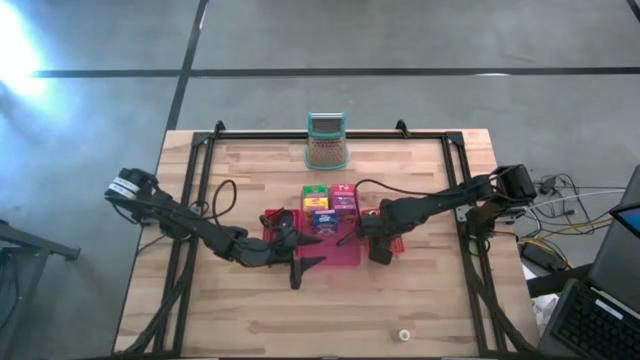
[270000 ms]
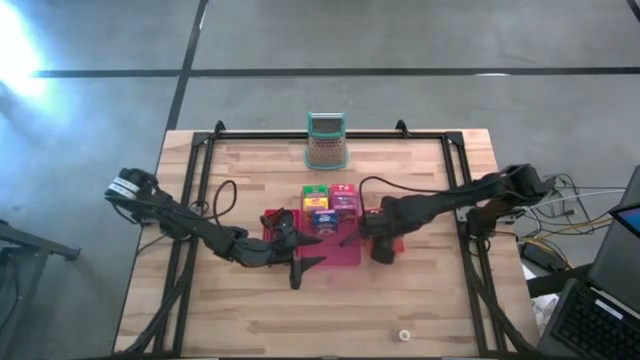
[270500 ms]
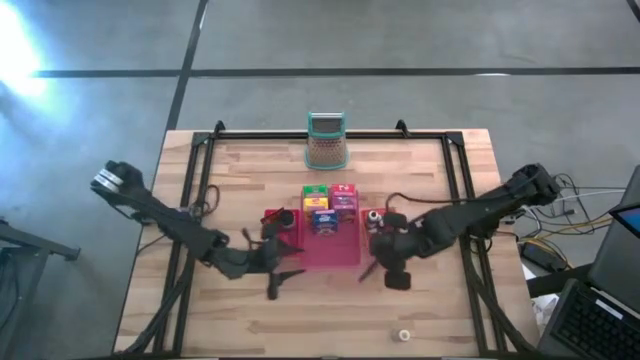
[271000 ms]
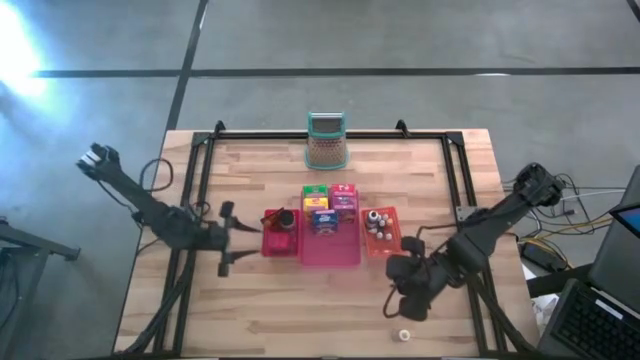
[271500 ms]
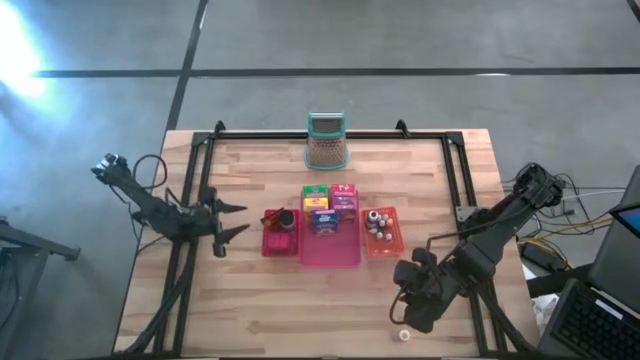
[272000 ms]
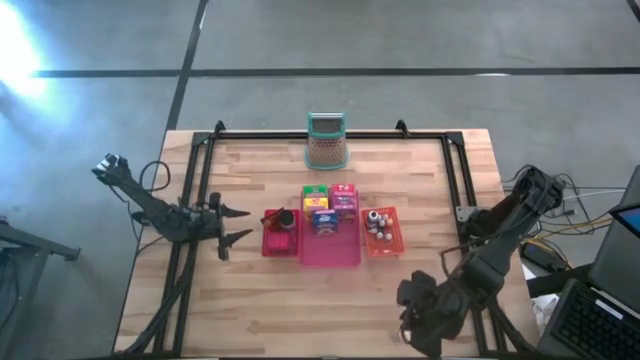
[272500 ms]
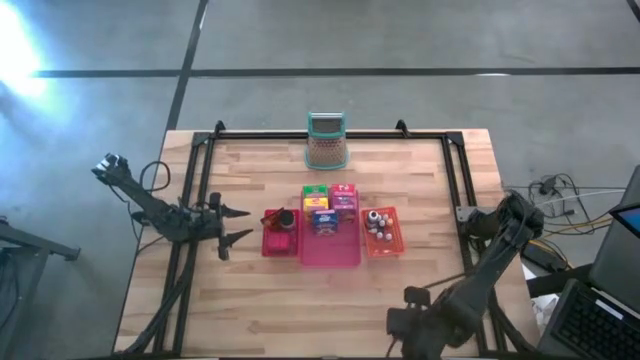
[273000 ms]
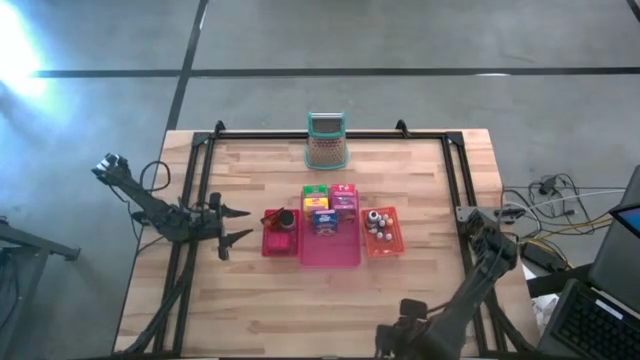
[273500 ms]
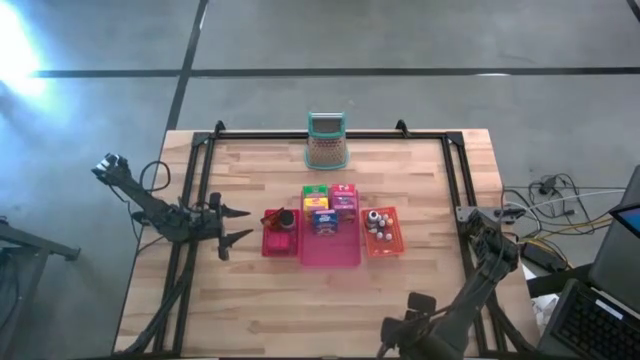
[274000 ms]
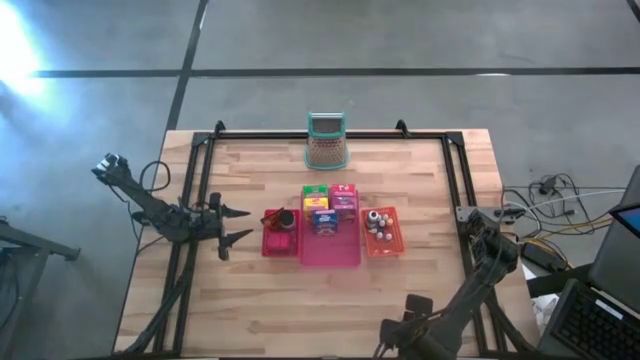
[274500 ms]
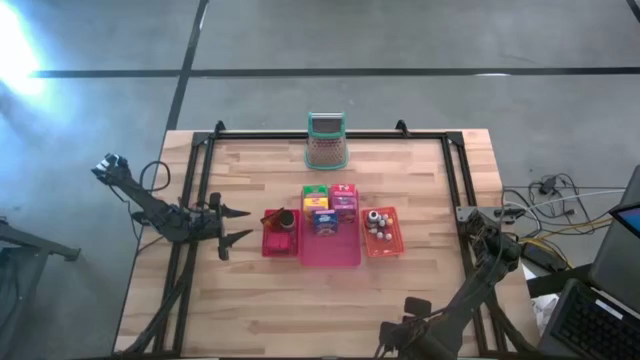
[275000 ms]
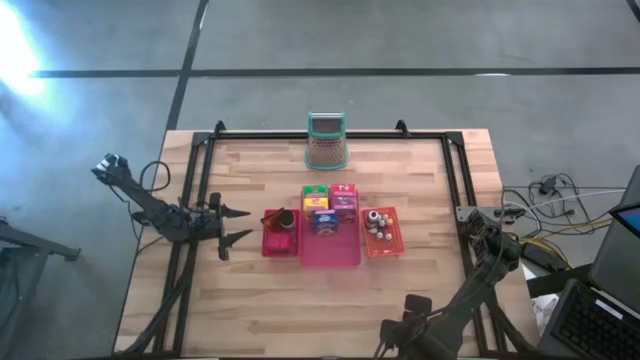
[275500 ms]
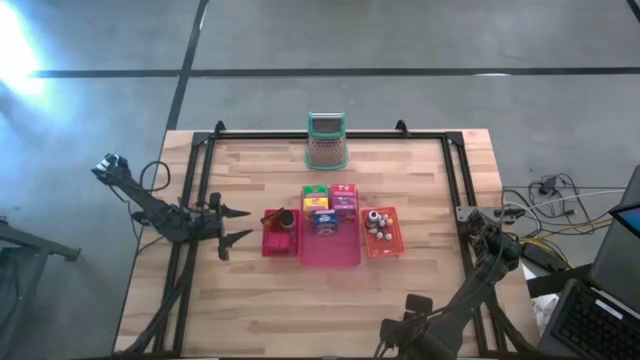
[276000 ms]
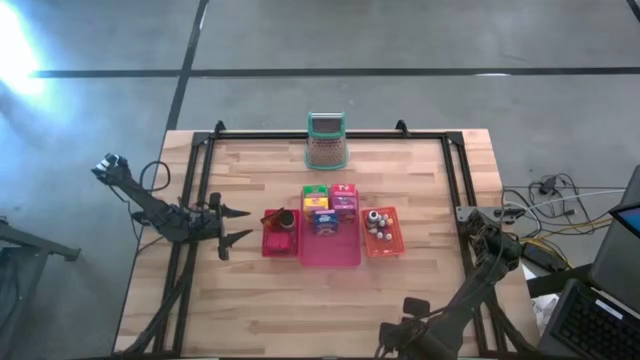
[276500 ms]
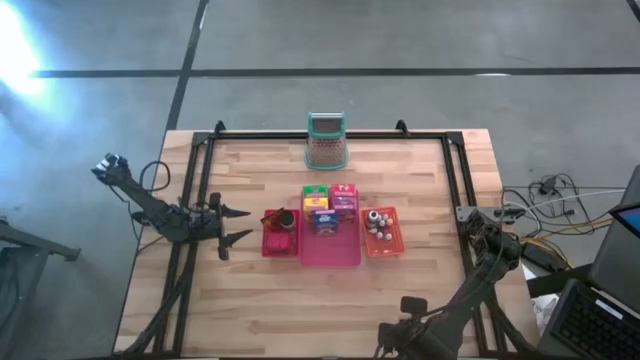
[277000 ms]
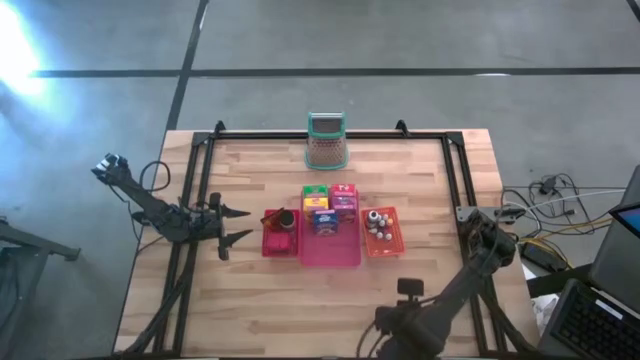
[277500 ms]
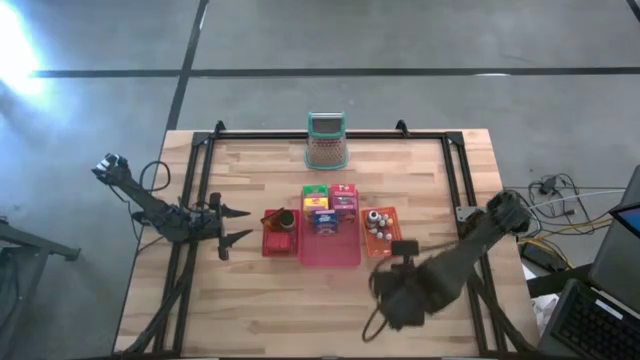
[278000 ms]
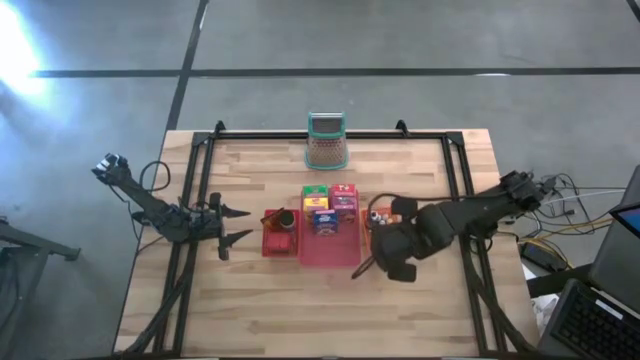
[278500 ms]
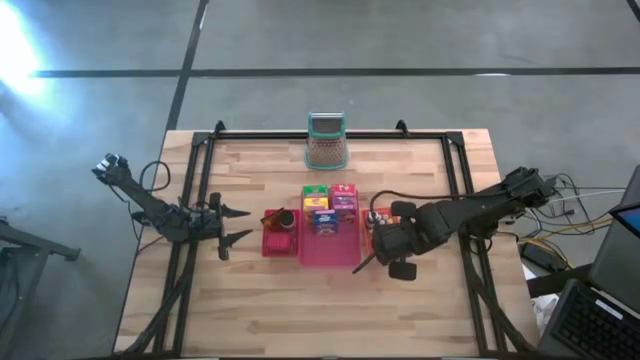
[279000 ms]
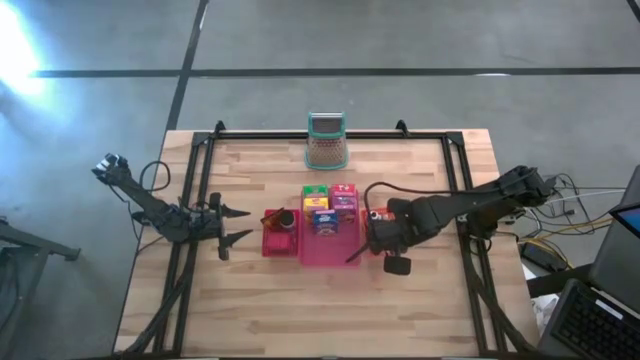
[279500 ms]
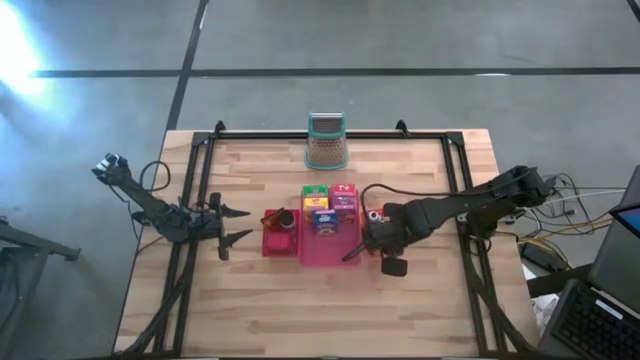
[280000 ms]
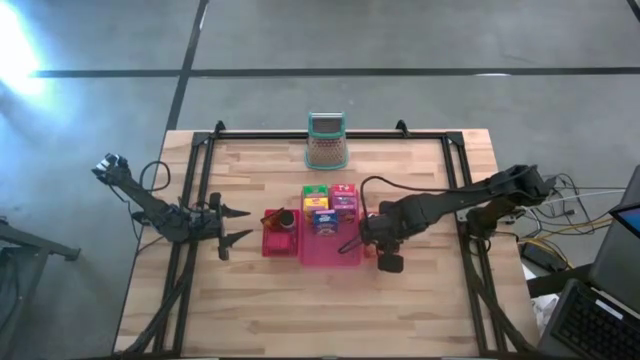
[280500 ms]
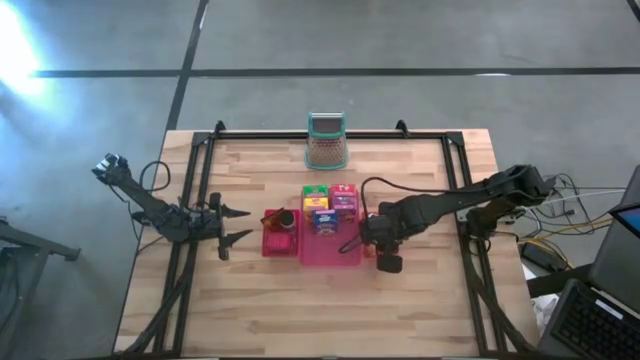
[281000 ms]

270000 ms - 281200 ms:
Task: Pick & Place Kitchen Items
Put the big yellow food coloring bottle into the orange bin

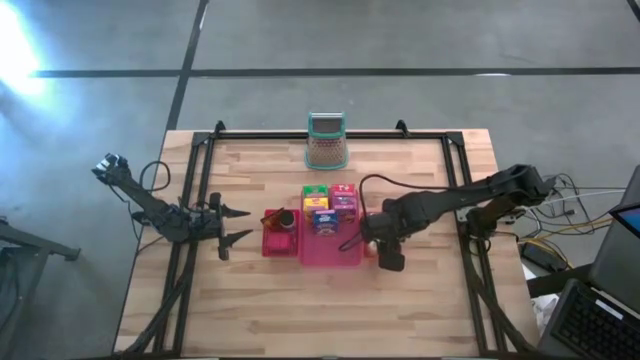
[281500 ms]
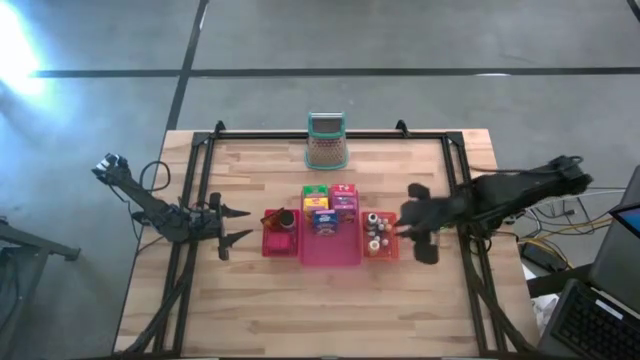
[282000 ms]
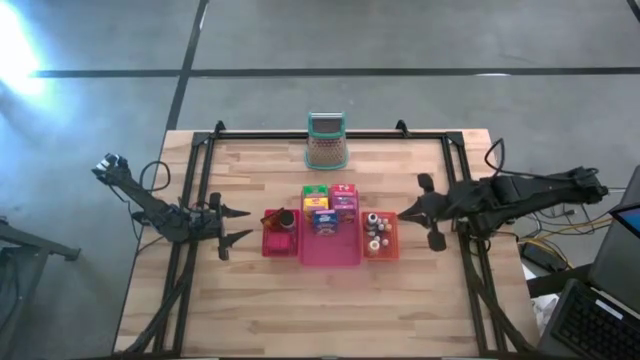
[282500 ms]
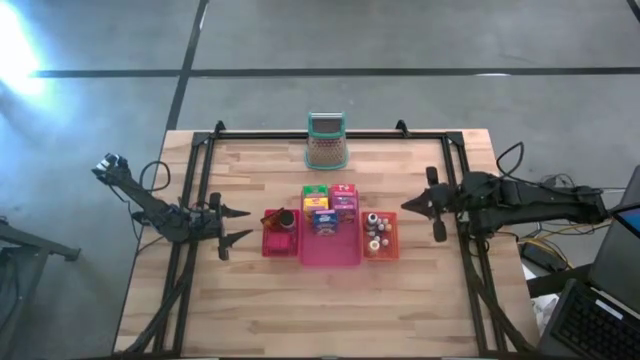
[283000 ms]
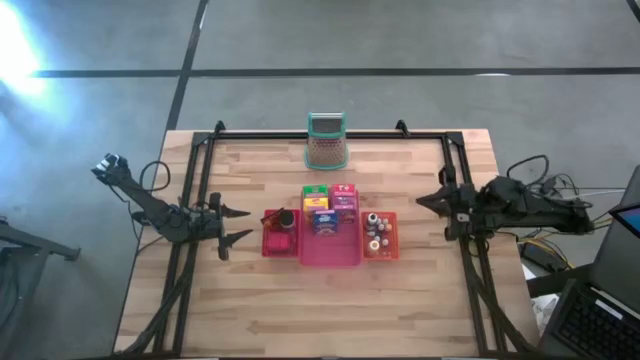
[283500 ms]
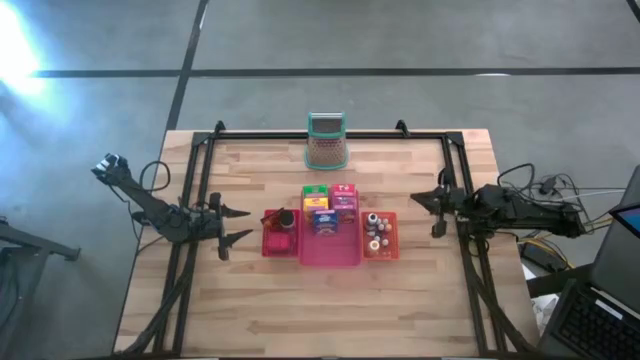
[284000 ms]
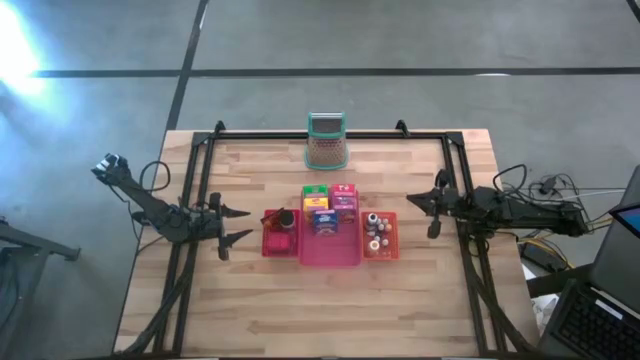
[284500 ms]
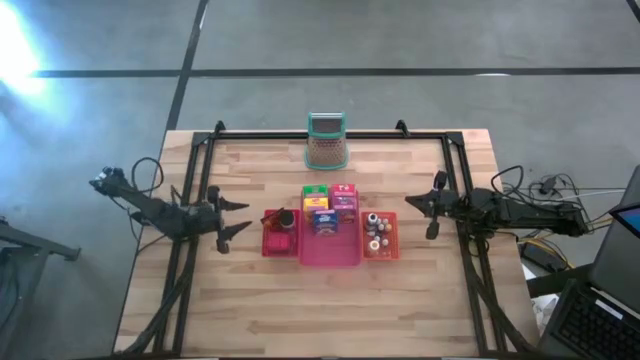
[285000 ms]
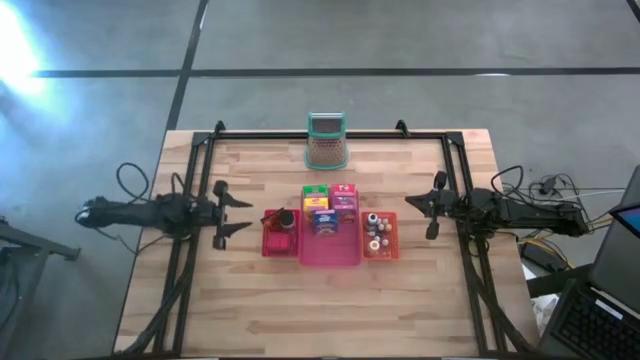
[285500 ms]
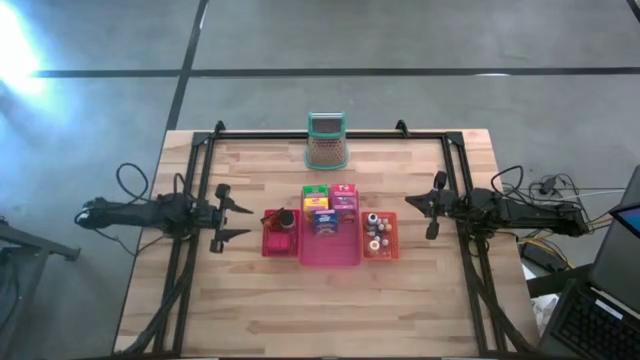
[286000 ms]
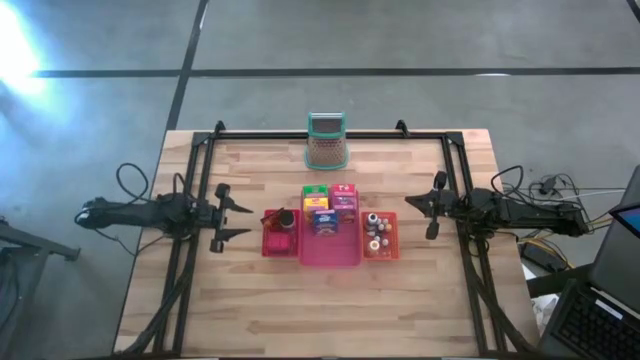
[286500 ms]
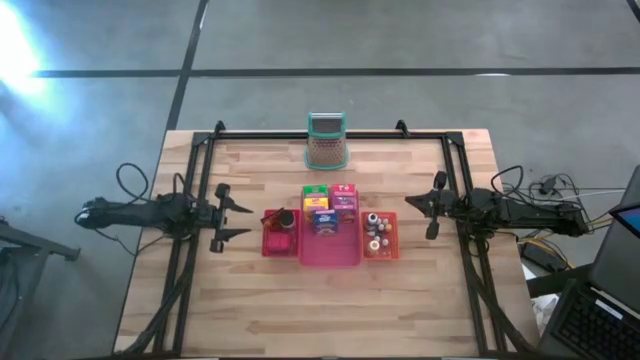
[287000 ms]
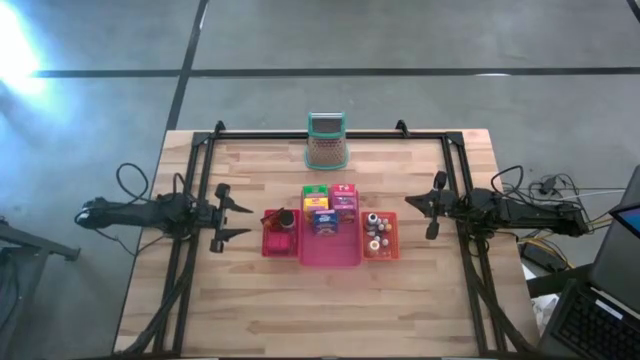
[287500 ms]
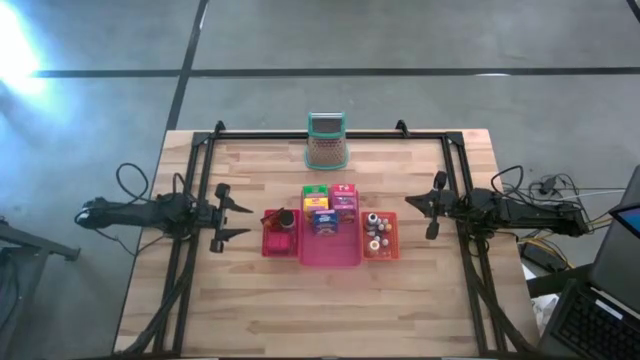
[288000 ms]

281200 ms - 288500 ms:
Return to Home Position

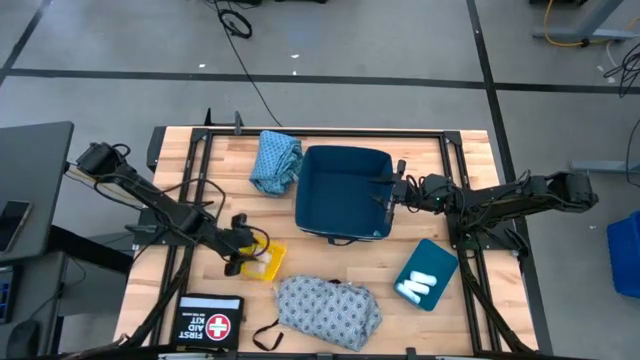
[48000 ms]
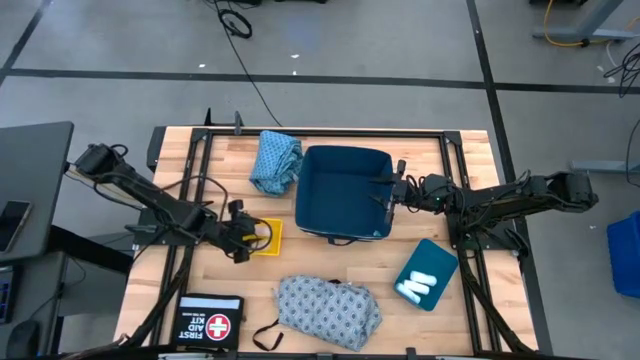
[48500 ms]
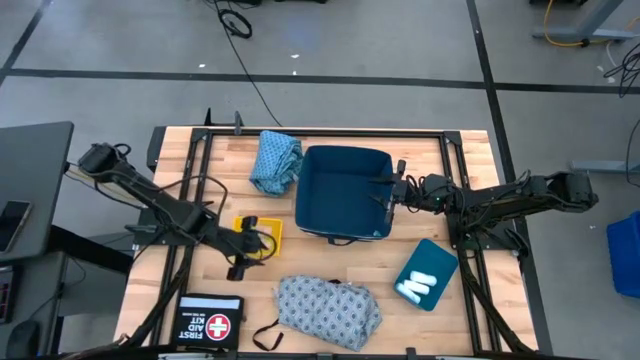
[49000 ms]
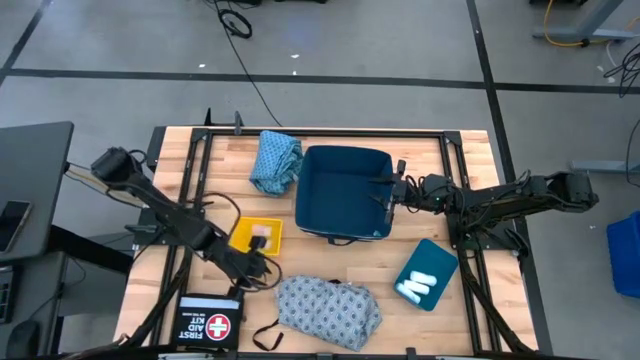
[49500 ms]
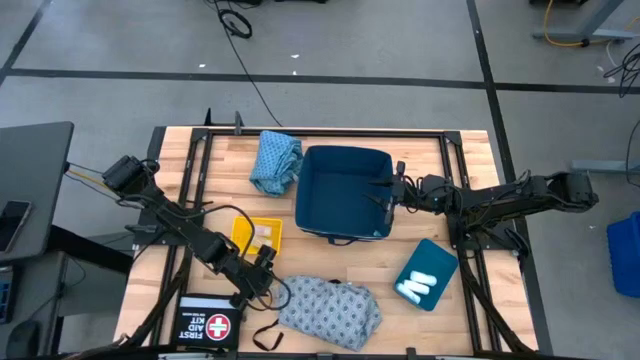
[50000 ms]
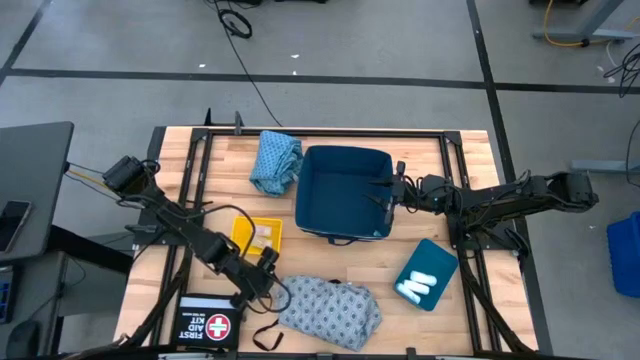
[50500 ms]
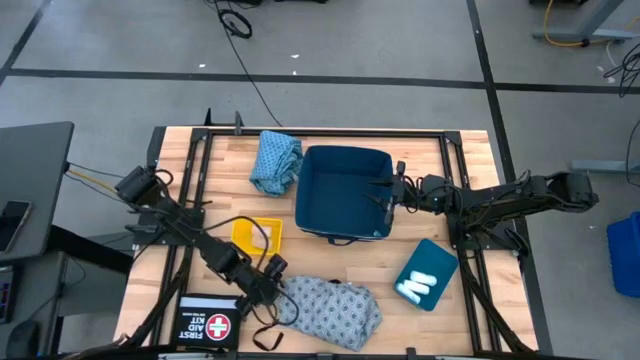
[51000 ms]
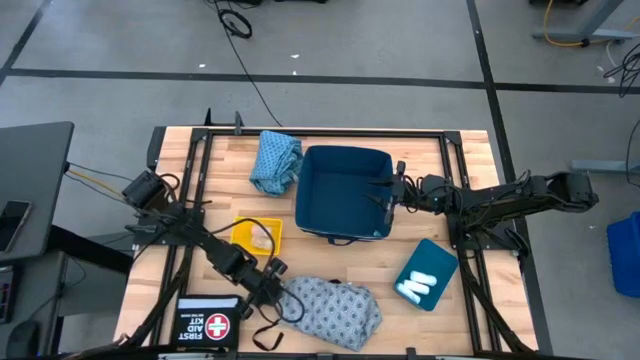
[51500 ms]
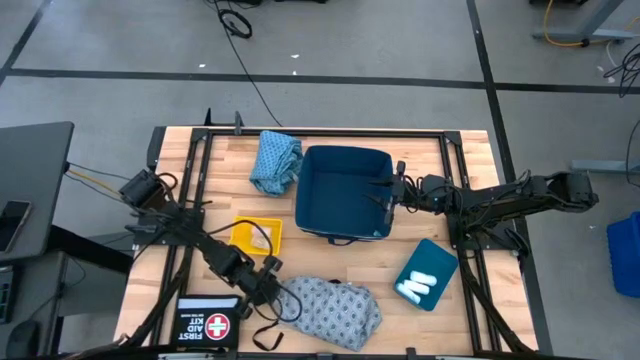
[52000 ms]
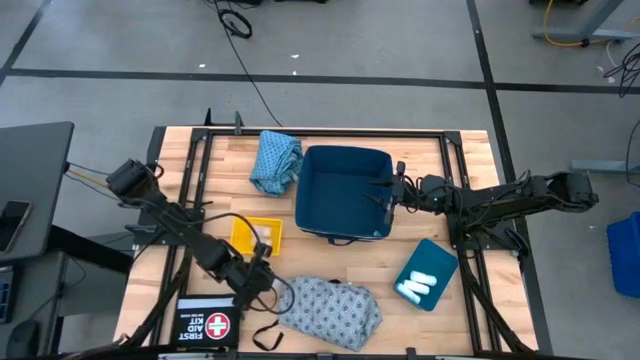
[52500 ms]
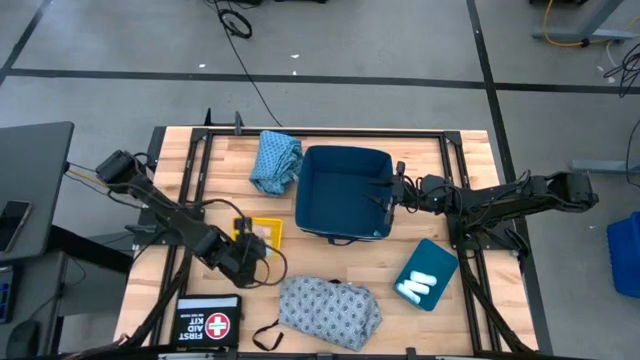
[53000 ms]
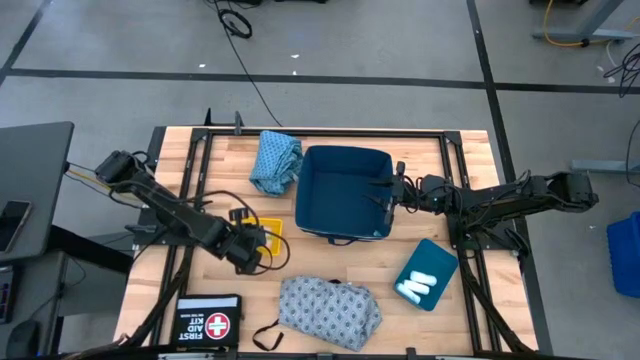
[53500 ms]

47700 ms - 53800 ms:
Task: Pick & place medical supplies in basket/bin
Put the transparent pill bottle into the yellow bin
